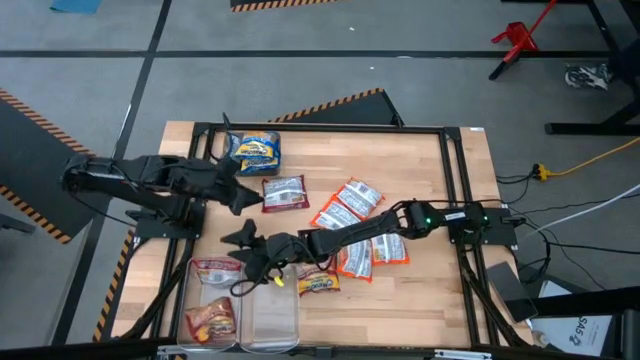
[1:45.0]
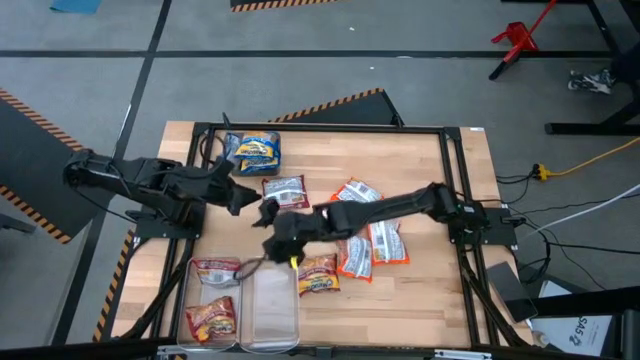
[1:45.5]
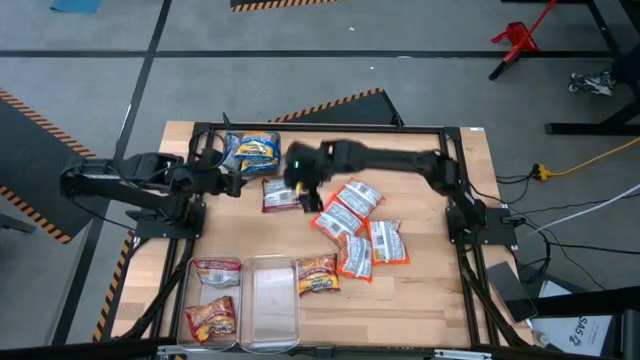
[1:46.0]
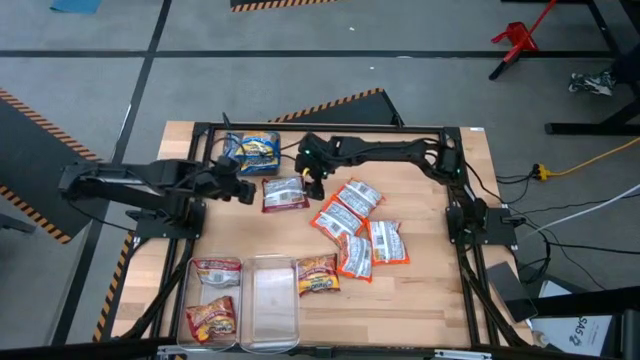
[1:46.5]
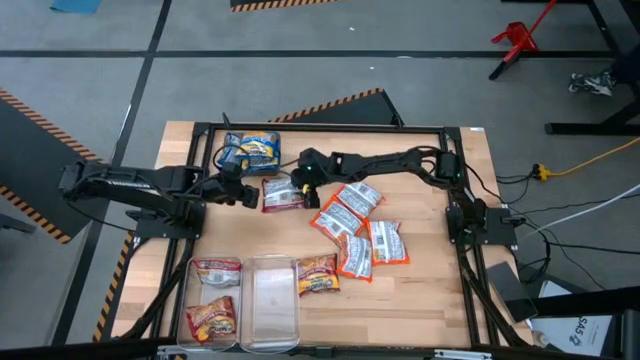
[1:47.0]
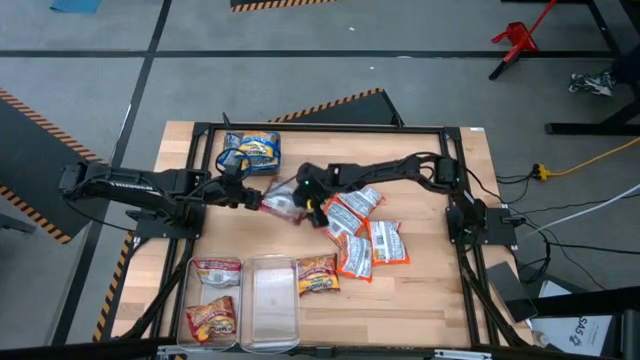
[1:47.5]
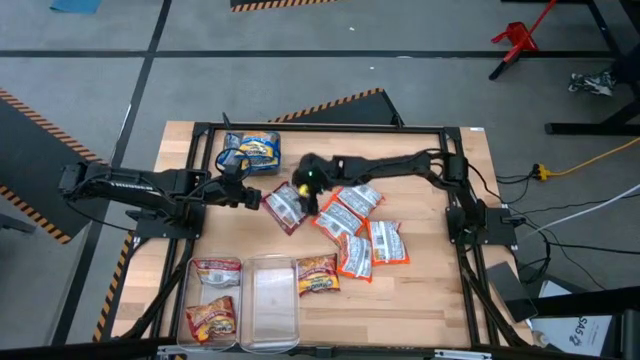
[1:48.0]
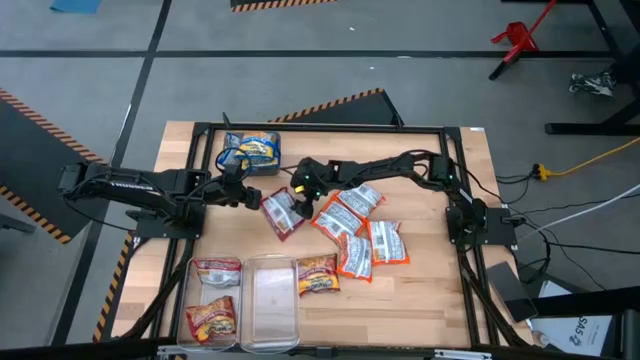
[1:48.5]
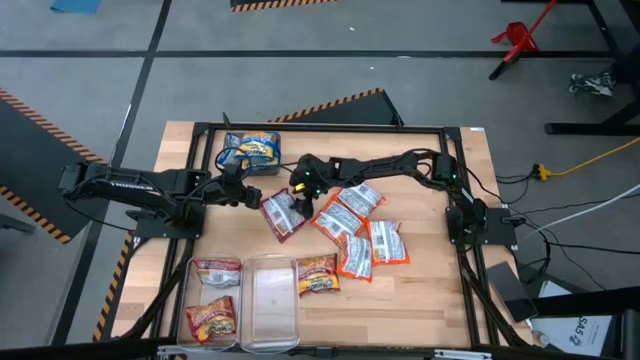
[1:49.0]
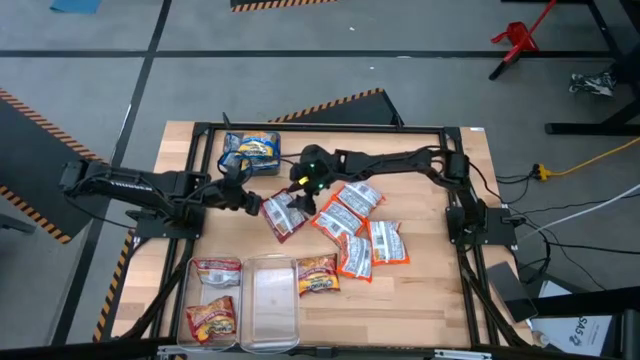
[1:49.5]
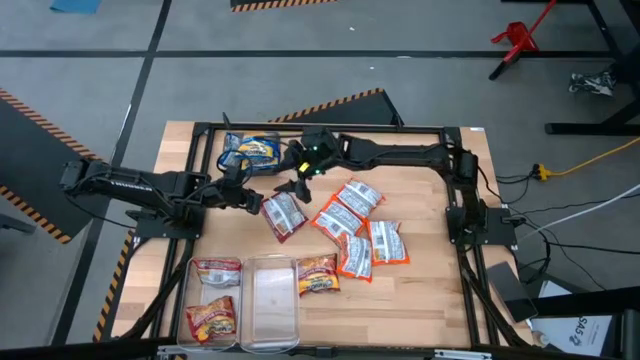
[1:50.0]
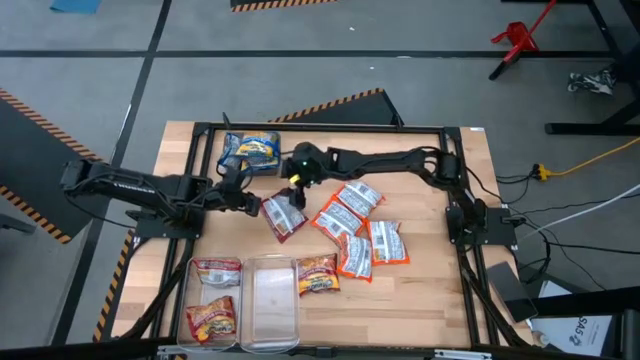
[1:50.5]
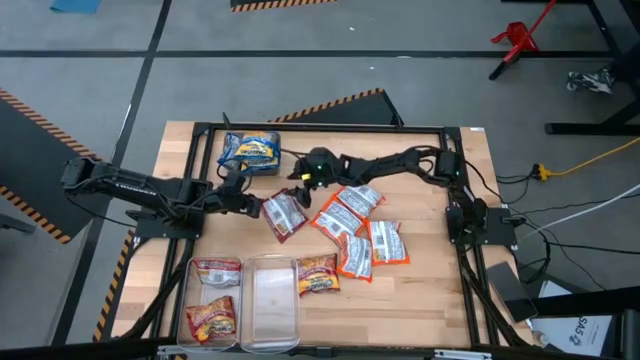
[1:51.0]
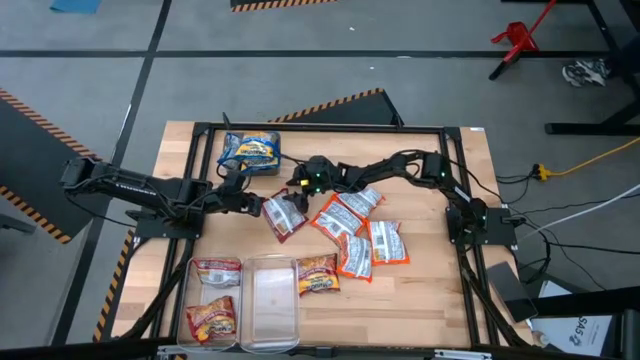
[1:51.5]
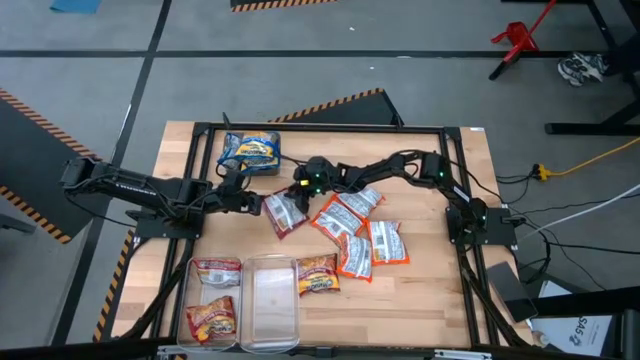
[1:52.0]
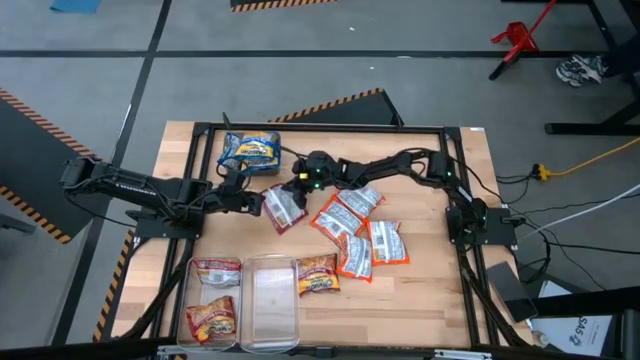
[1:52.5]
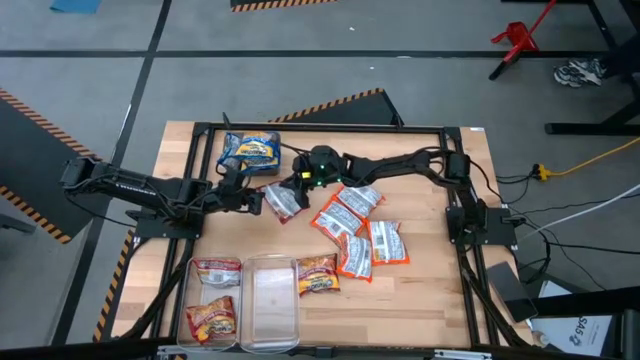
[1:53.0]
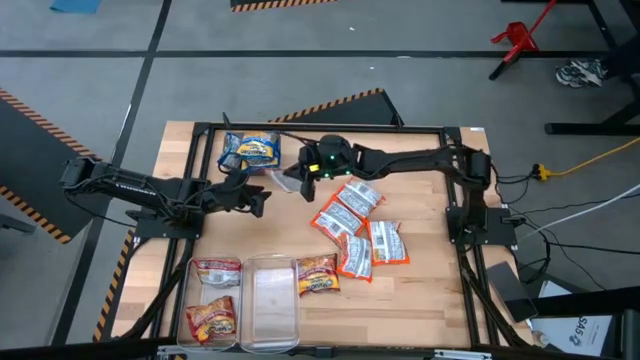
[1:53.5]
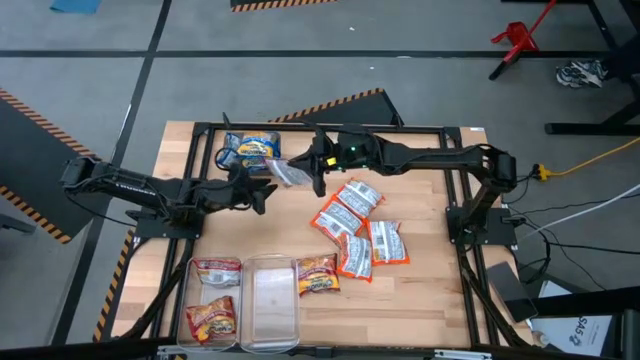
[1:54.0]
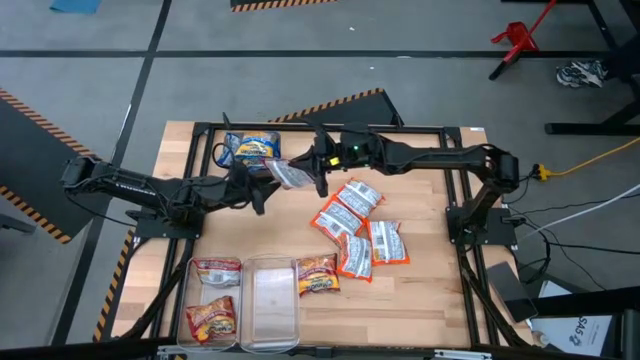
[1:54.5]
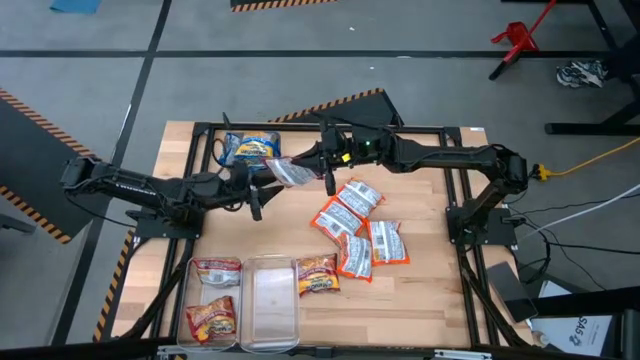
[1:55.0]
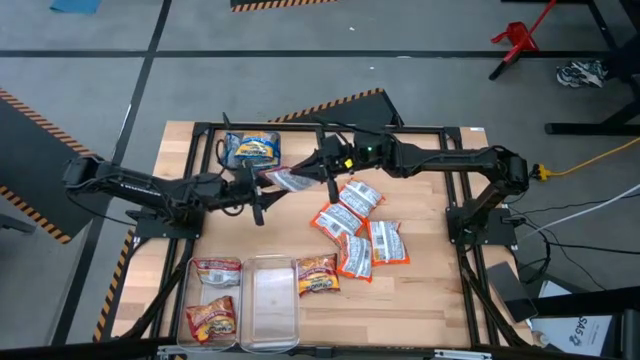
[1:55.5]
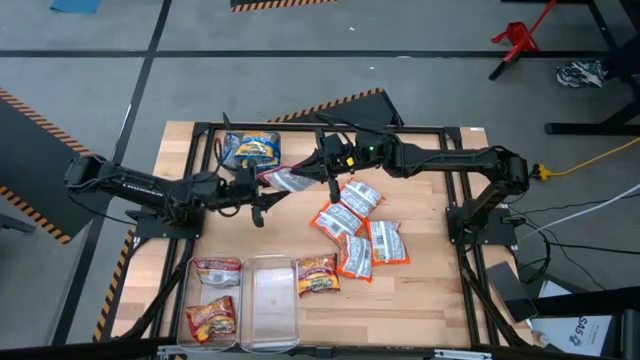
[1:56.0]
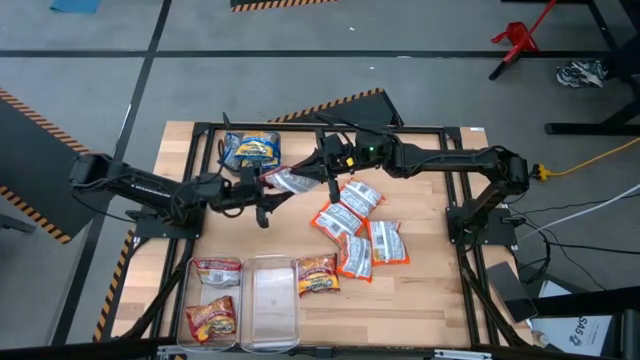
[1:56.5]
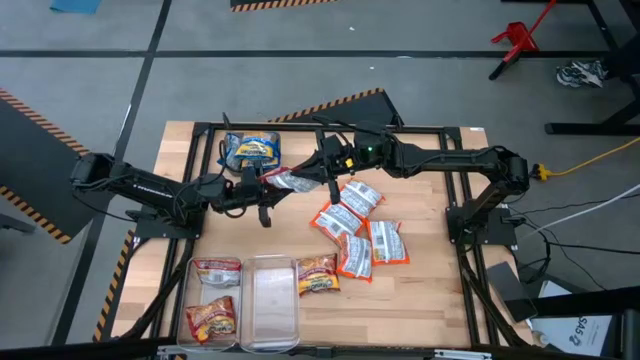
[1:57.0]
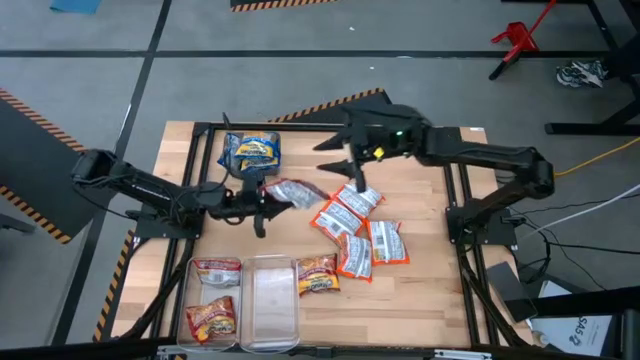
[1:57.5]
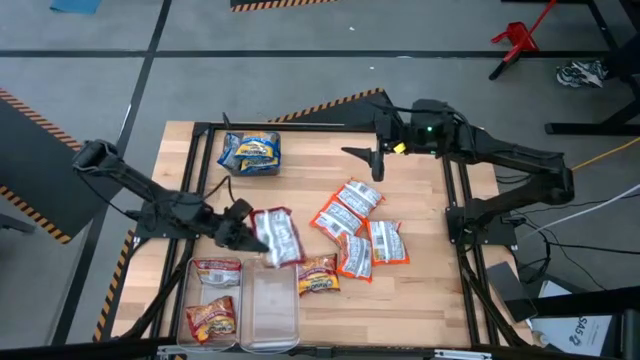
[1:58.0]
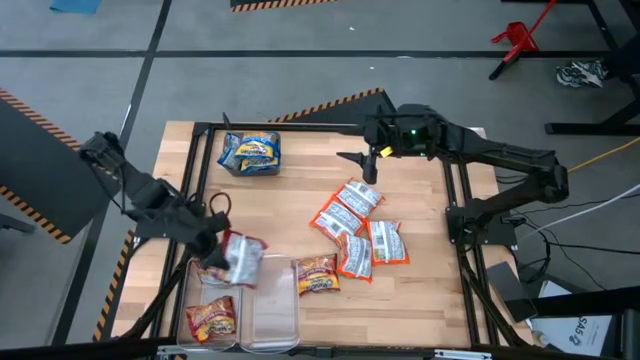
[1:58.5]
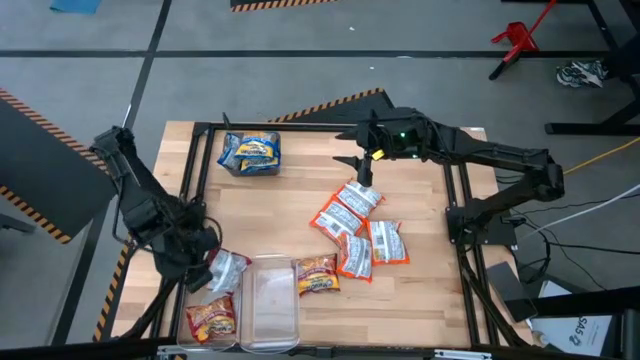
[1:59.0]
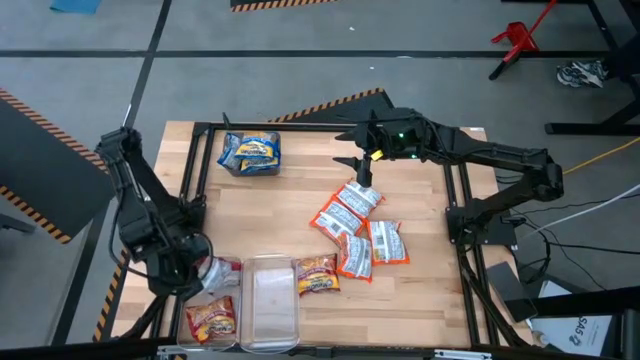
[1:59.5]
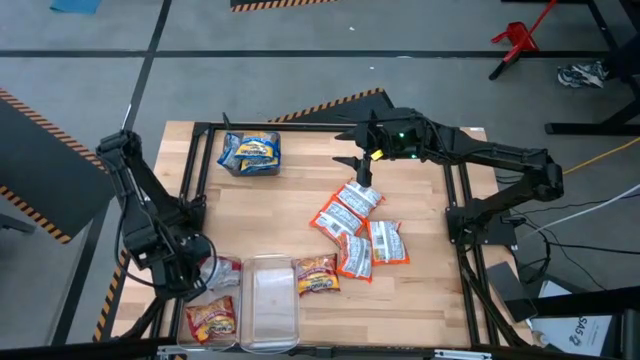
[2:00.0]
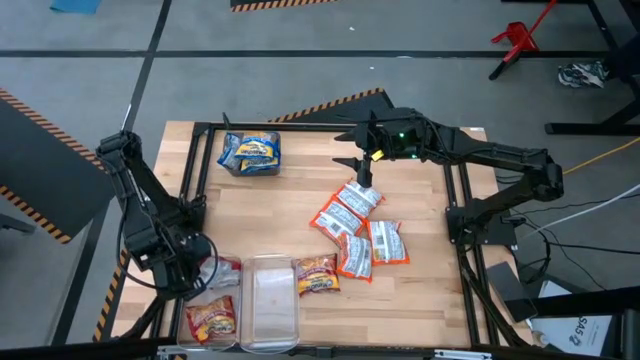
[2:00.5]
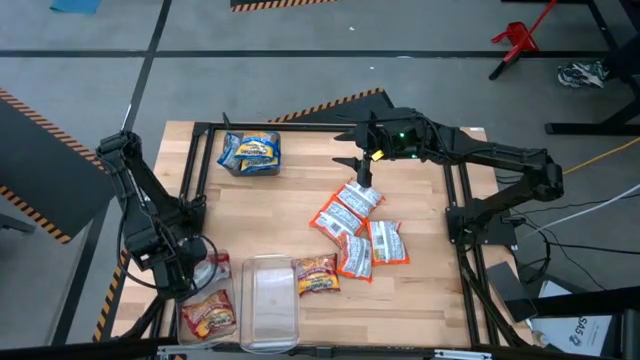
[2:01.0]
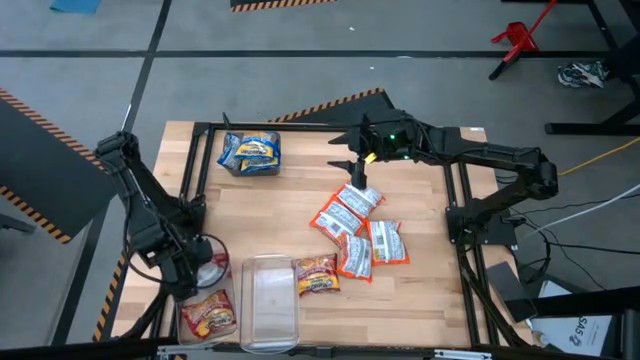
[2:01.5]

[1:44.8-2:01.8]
Task: Sort Maruchan noodles
Put the red noodle pack into the left transparent bin

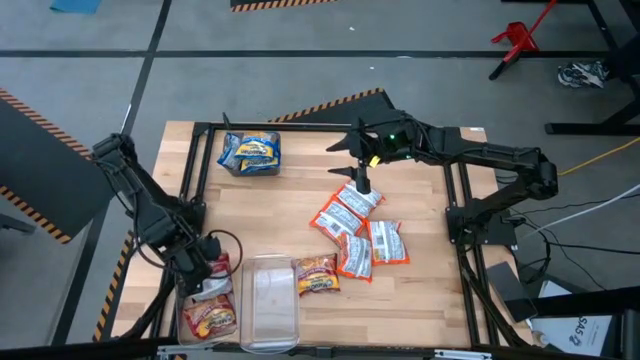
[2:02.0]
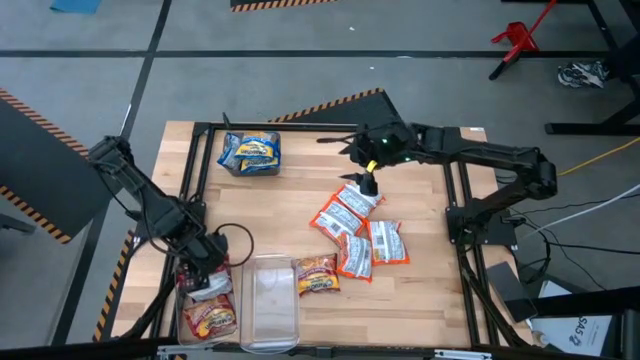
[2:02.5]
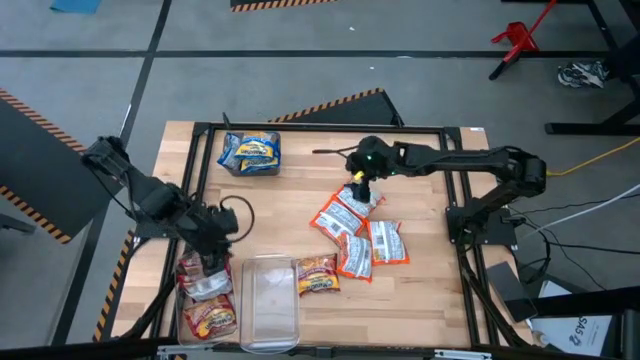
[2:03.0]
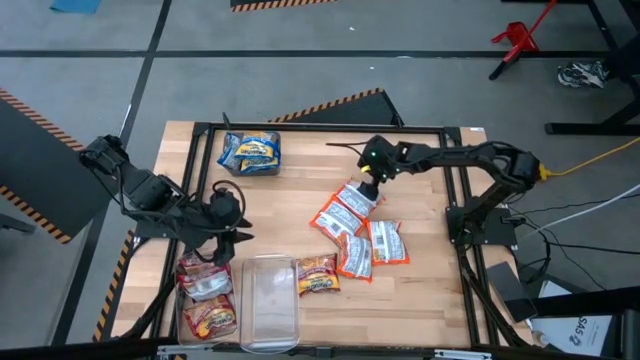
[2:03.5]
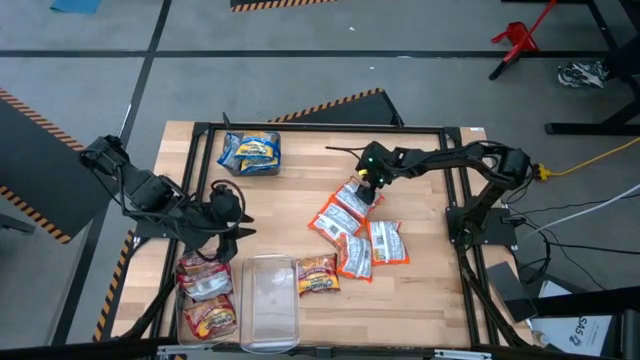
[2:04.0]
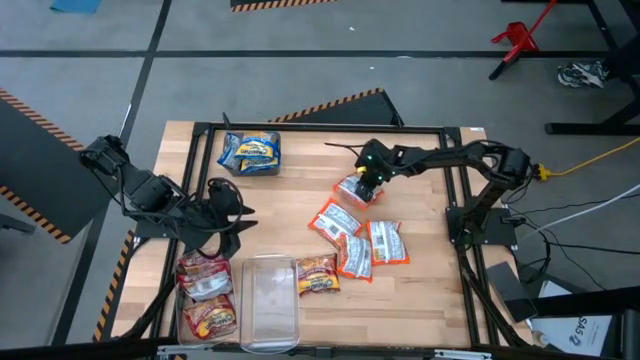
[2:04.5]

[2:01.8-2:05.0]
Put the orange noodle pack into the right transparent bin

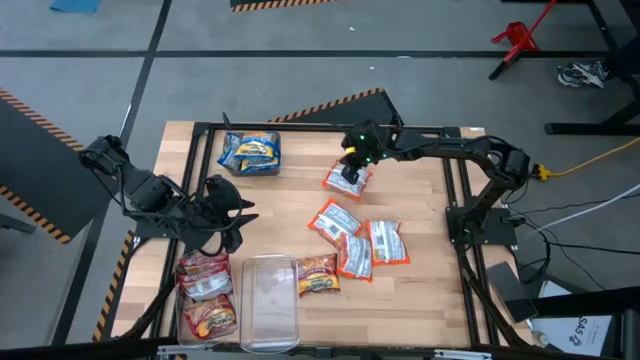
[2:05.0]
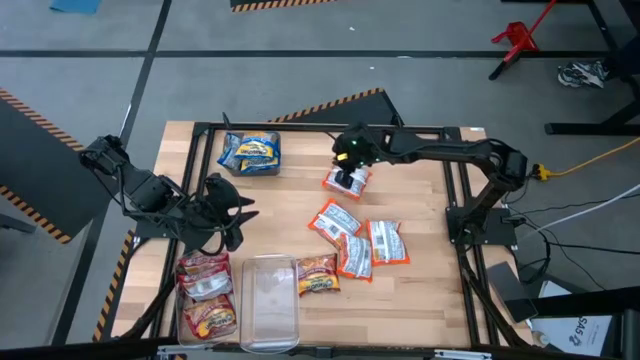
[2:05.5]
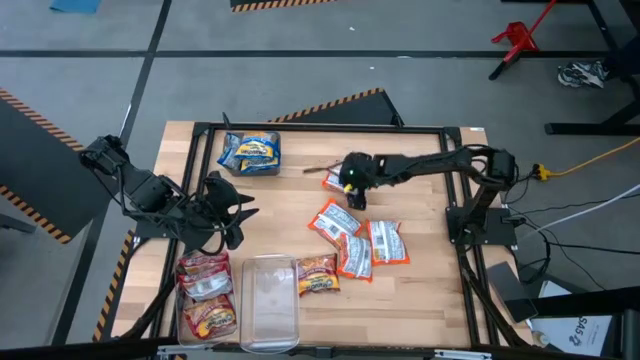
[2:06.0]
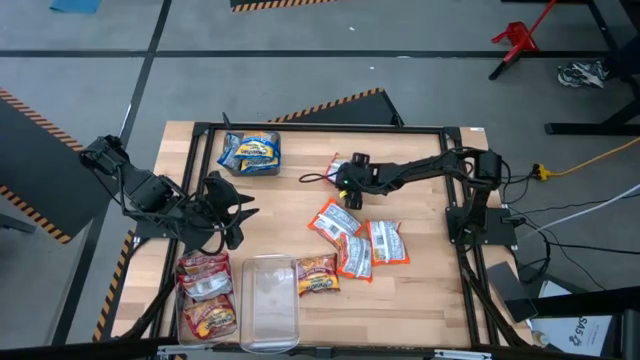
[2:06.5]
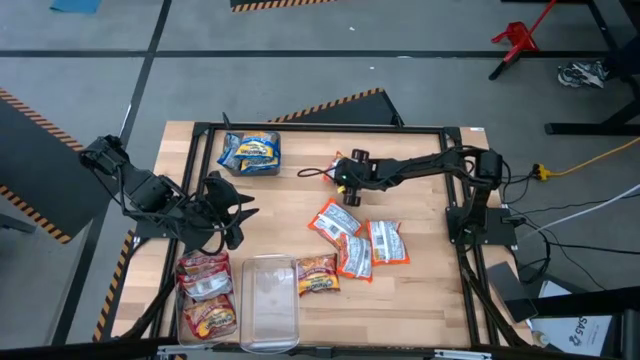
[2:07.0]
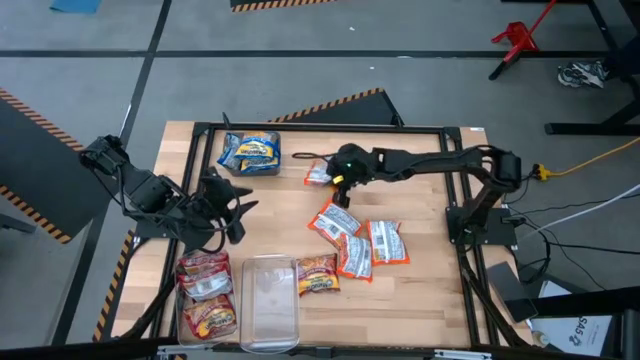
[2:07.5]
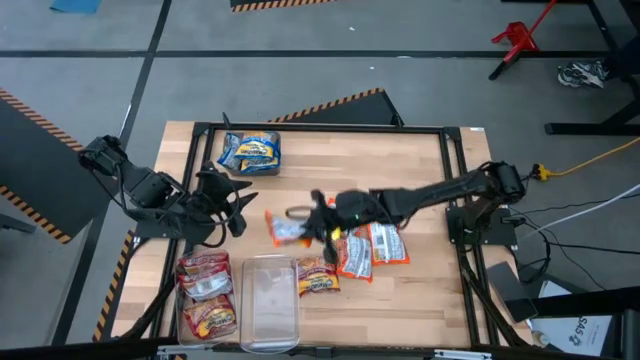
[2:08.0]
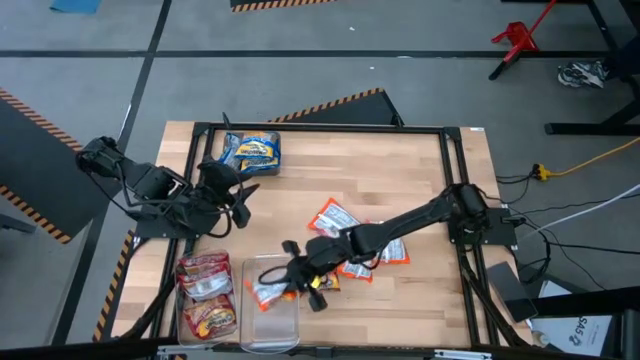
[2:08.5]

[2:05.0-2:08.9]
Put the orange noodle pack into the right transparent bin
